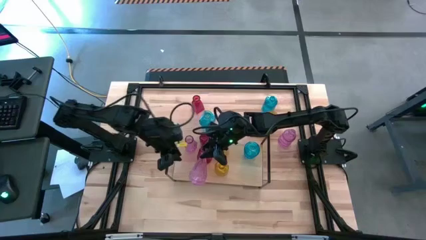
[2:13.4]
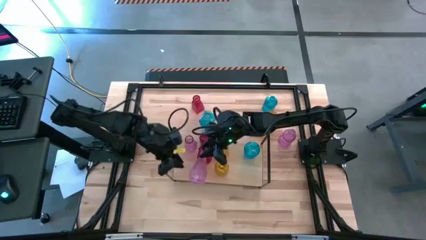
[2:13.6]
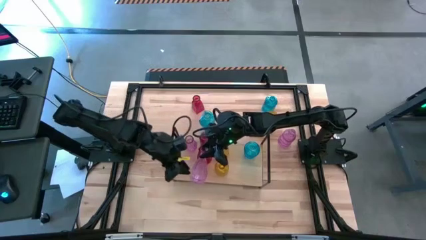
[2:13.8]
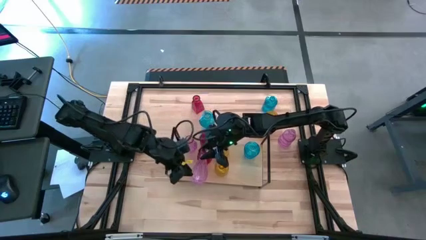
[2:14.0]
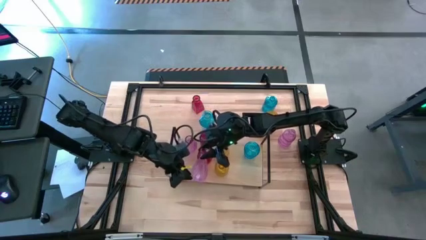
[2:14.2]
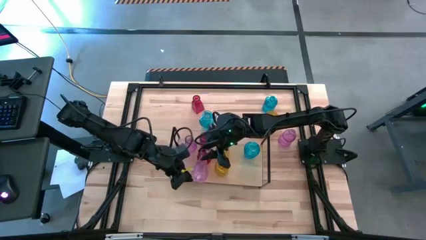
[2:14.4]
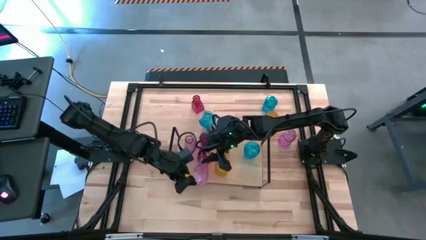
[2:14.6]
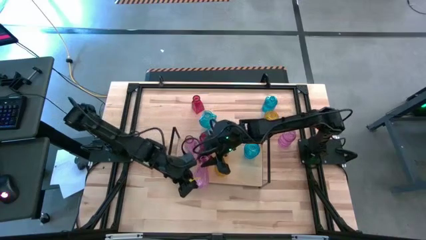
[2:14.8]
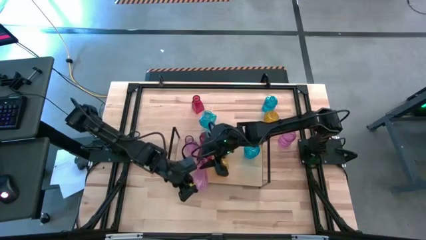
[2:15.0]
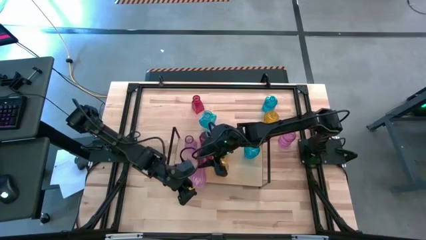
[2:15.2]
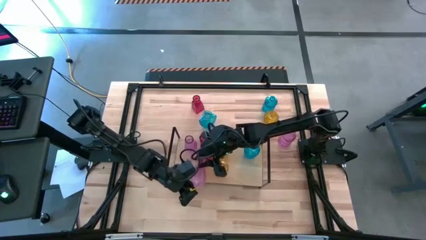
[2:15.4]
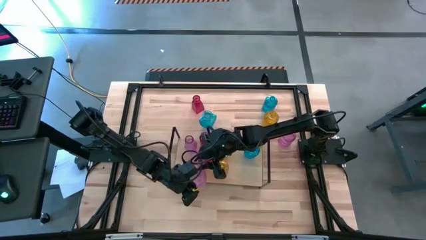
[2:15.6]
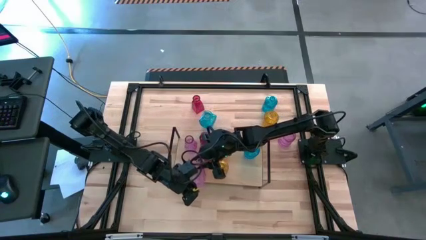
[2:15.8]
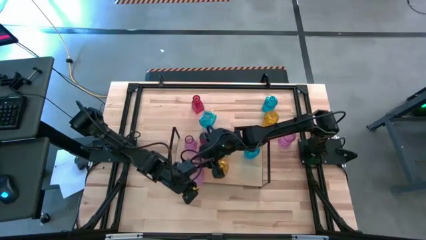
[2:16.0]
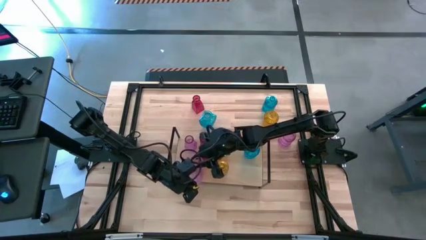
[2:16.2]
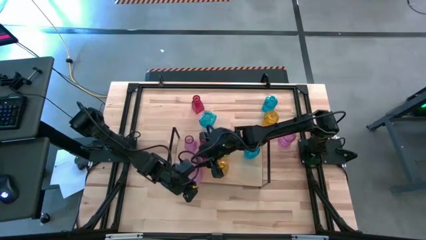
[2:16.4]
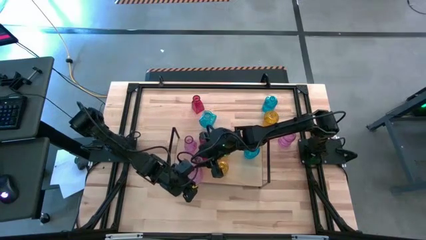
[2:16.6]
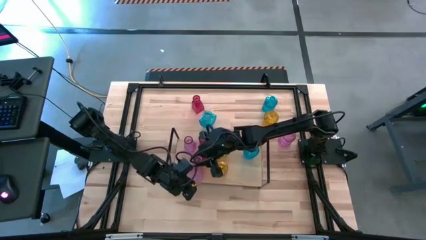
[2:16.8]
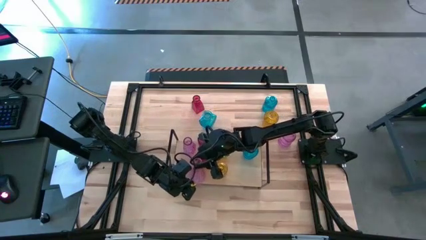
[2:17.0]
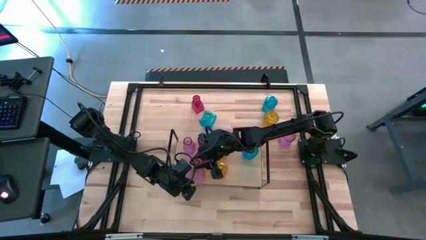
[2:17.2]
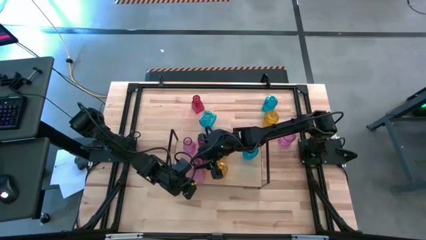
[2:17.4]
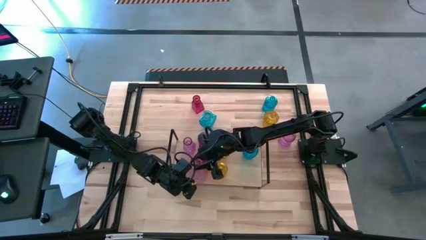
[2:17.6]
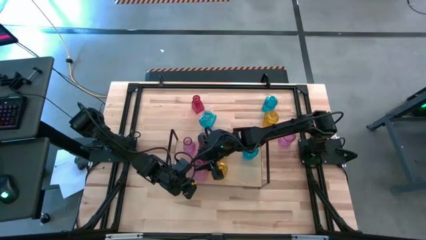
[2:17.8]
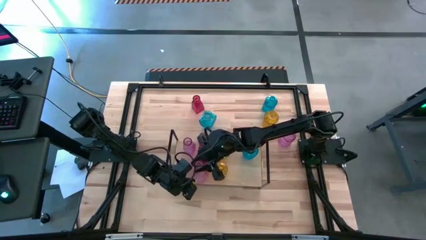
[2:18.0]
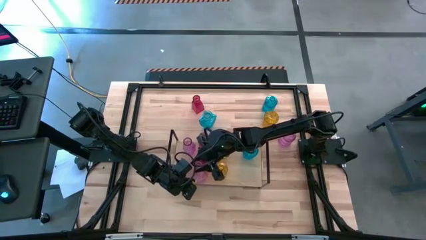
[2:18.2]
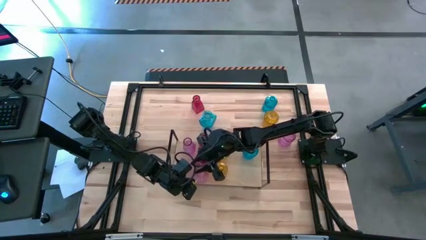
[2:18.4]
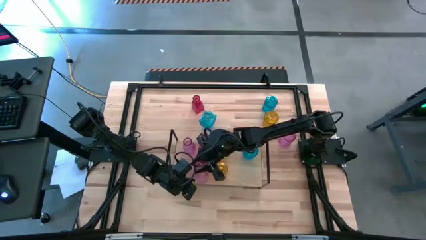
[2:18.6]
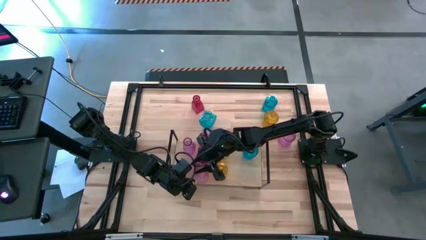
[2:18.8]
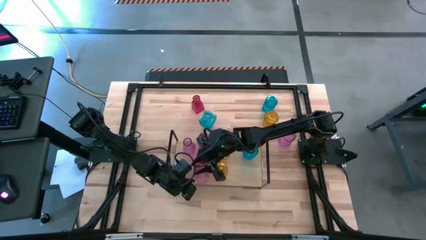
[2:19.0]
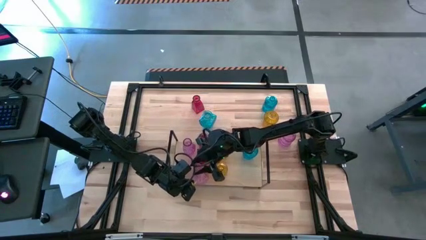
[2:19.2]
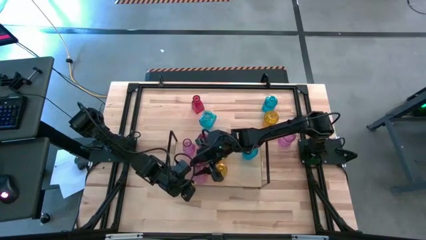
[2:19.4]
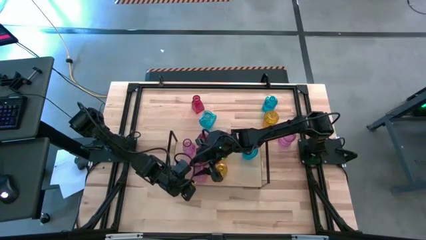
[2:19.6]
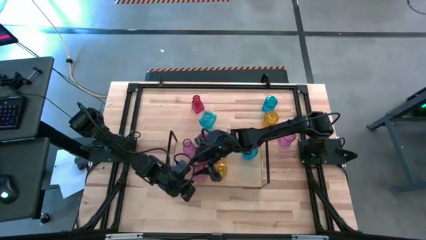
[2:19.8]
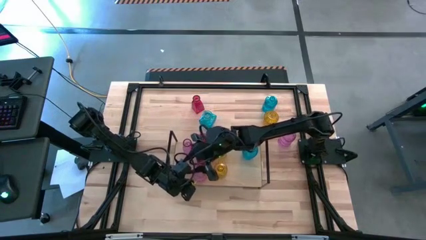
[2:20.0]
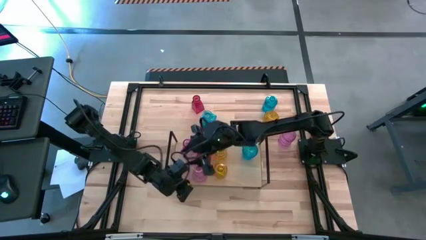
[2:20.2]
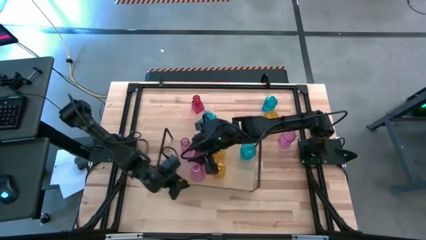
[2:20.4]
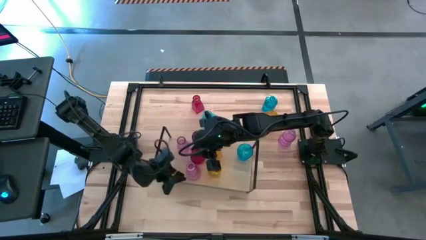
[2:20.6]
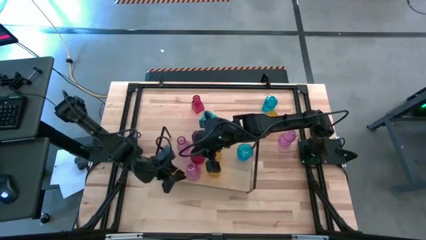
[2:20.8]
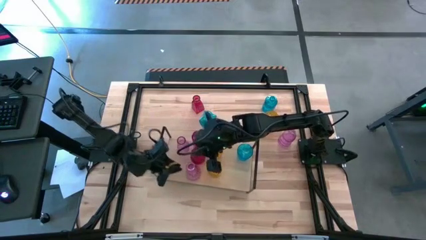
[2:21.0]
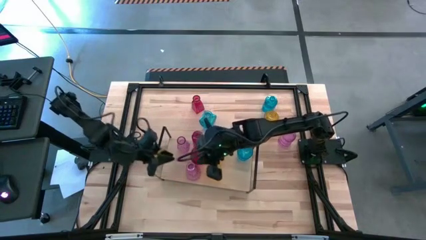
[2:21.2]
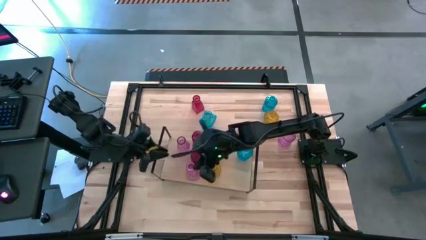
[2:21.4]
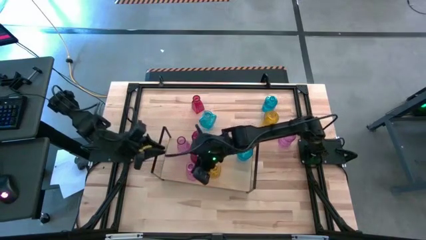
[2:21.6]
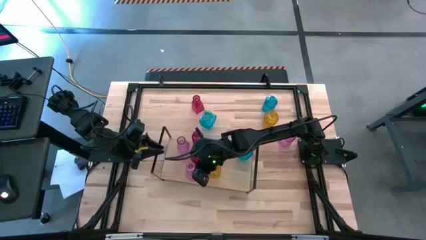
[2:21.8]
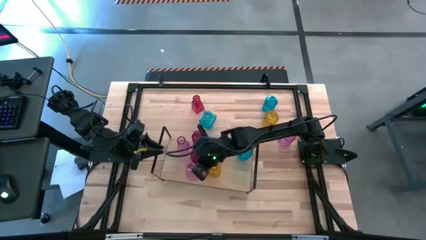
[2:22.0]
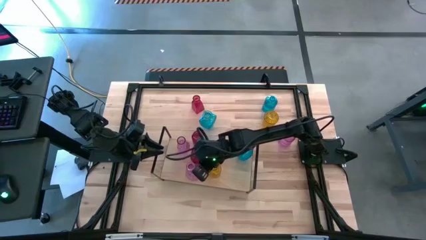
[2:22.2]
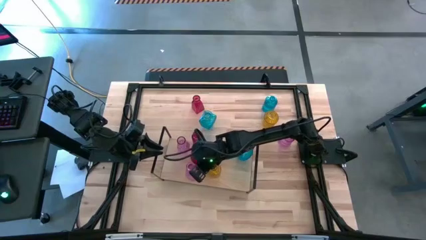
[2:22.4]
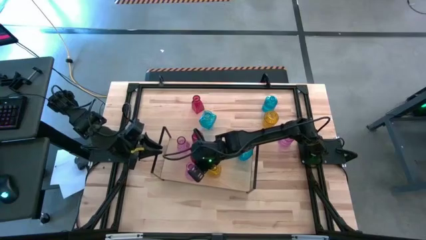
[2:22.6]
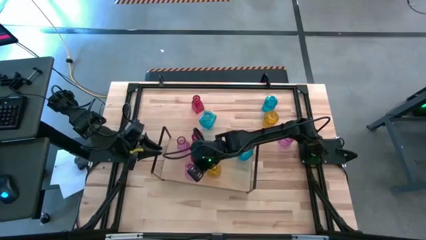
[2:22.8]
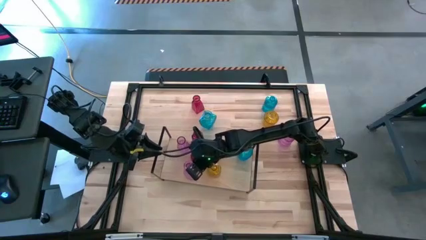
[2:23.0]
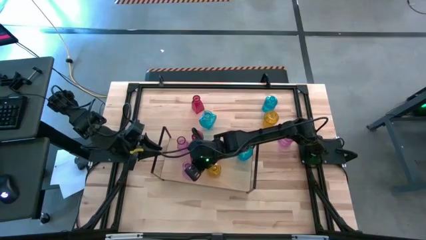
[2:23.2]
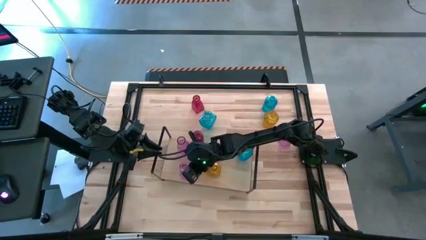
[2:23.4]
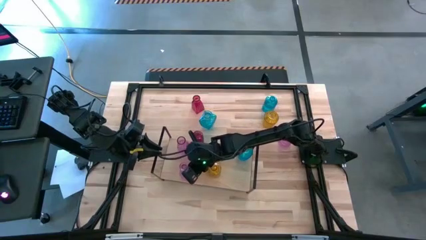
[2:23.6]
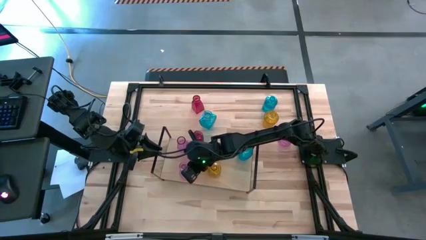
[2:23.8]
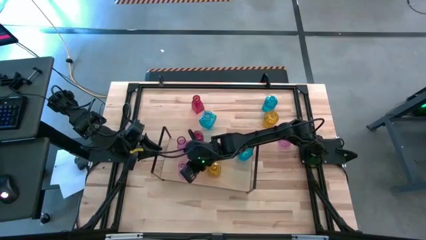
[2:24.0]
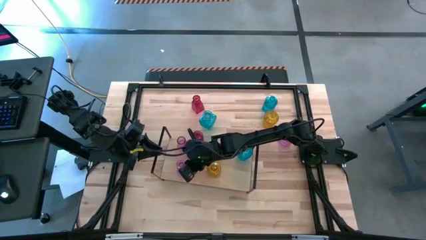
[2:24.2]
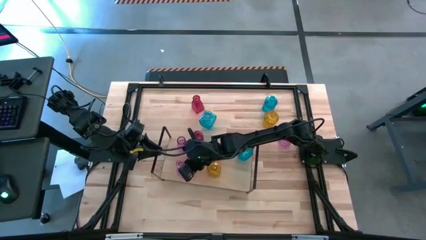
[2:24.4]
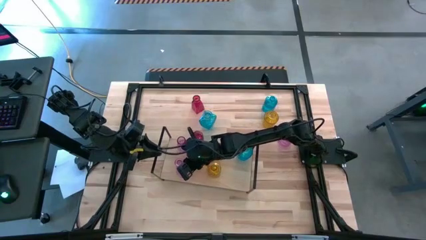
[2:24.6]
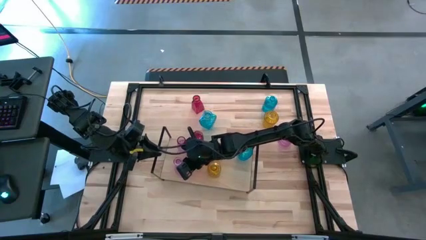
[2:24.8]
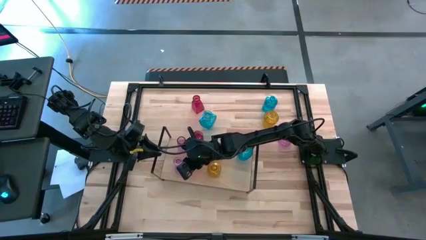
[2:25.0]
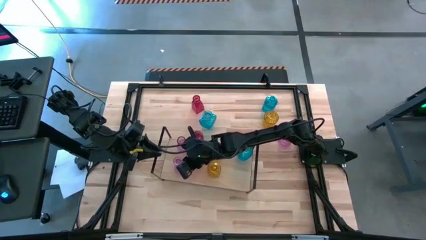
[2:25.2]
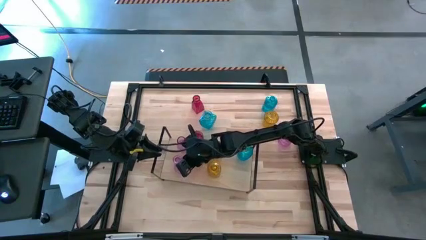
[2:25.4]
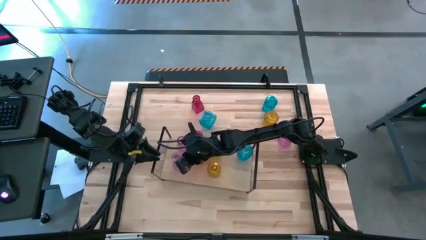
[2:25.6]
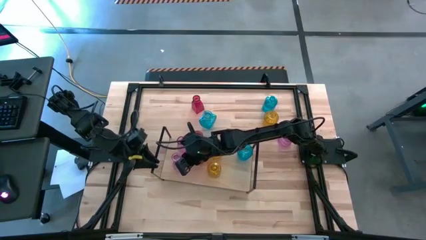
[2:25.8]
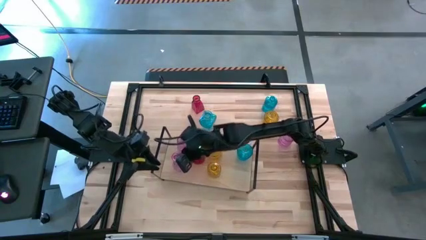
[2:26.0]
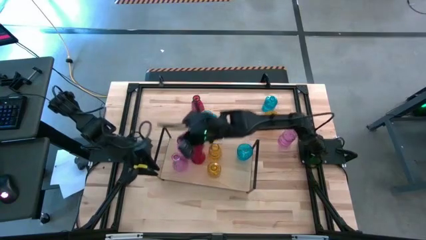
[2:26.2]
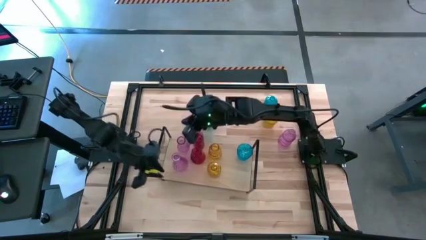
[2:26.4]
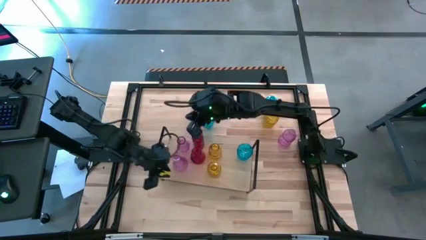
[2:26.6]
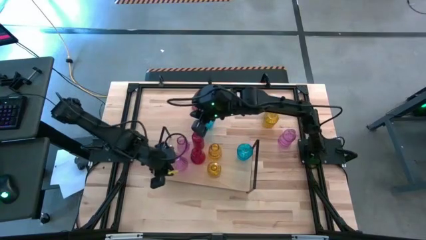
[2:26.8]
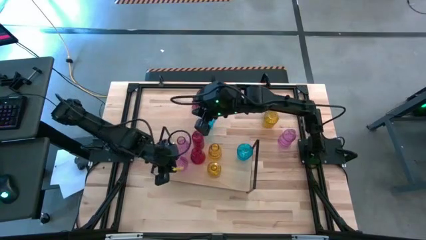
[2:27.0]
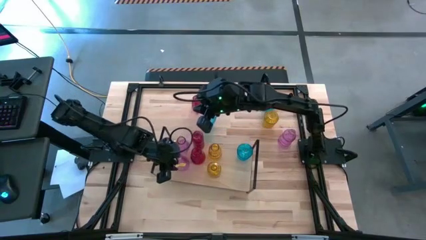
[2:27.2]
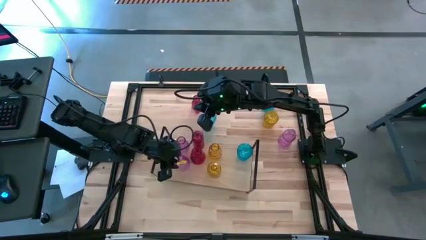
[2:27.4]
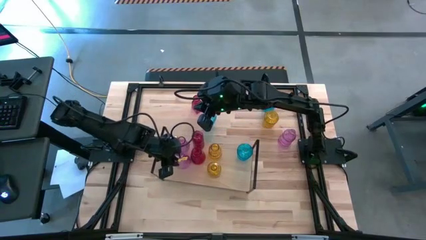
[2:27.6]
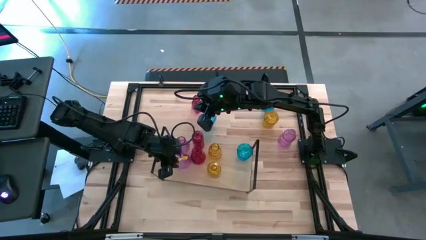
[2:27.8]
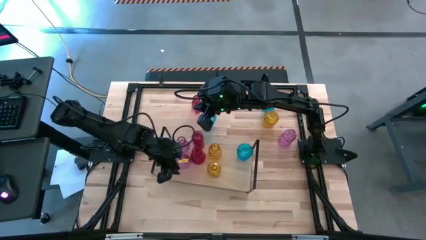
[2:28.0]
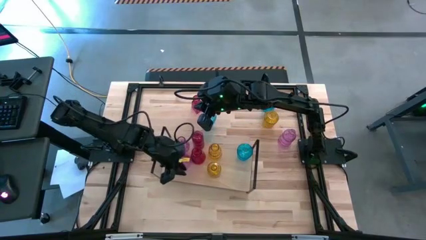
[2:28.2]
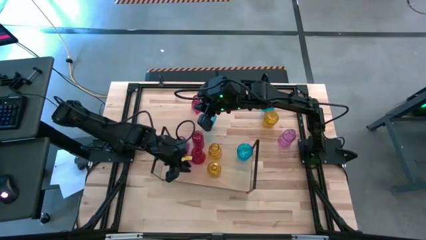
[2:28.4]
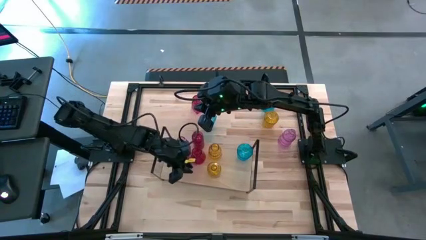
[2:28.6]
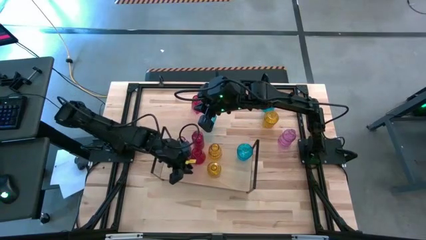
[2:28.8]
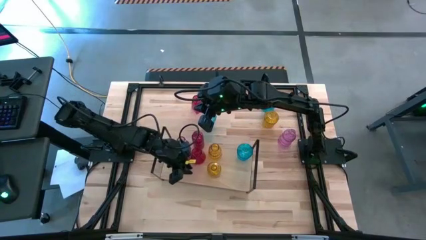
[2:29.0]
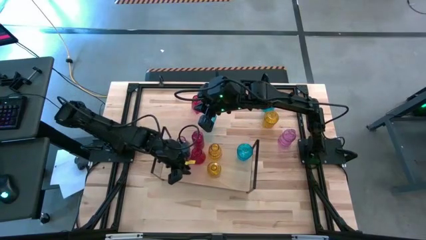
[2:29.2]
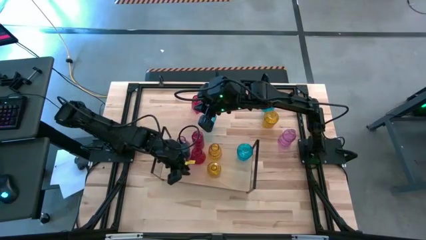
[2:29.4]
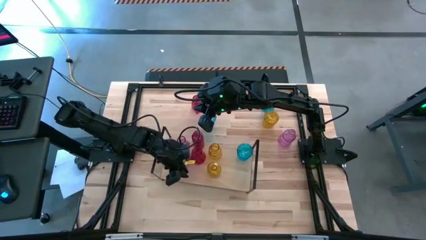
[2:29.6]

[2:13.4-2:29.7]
Task: sort vases onto shelf
Put the top violet vase on the shelf aligned with the other violet vase
